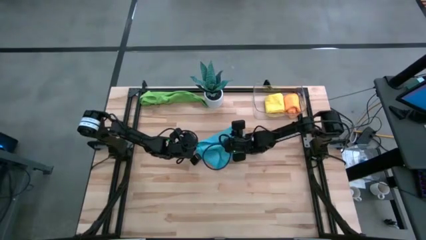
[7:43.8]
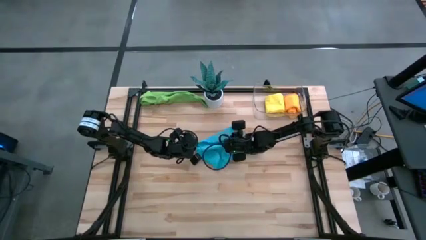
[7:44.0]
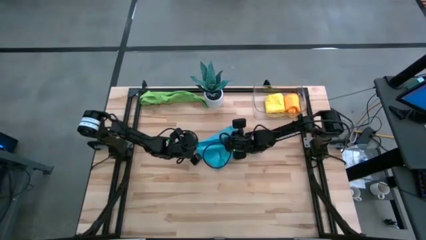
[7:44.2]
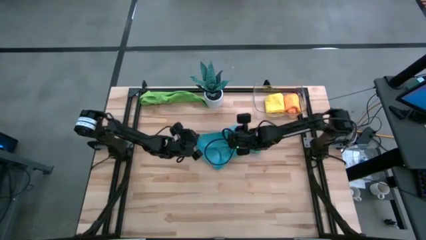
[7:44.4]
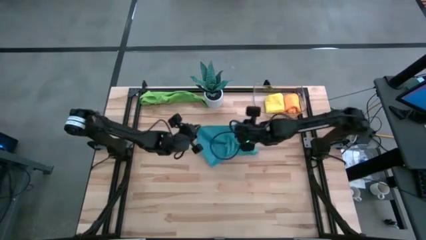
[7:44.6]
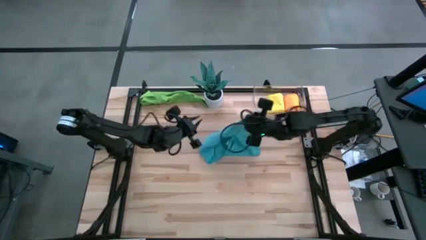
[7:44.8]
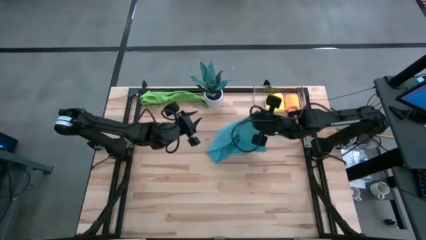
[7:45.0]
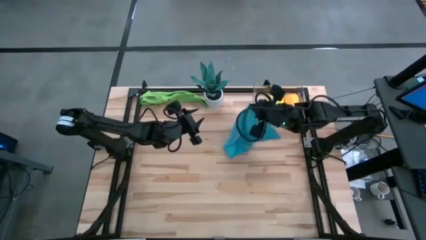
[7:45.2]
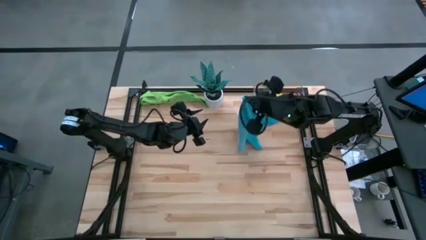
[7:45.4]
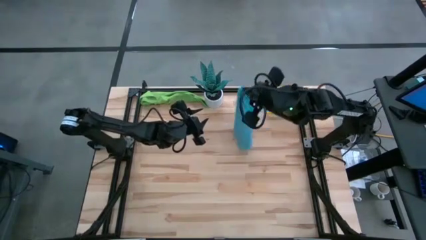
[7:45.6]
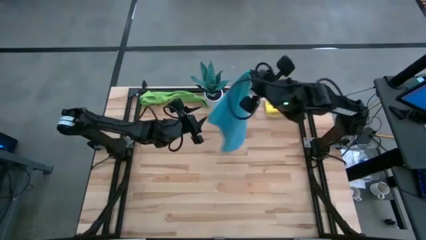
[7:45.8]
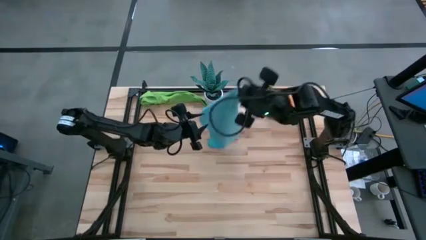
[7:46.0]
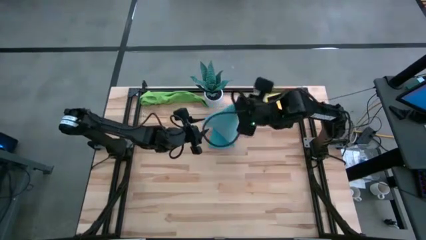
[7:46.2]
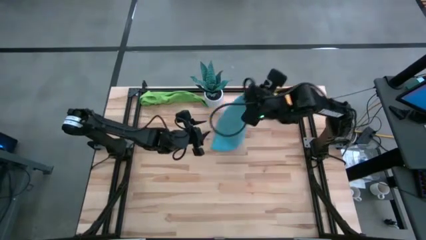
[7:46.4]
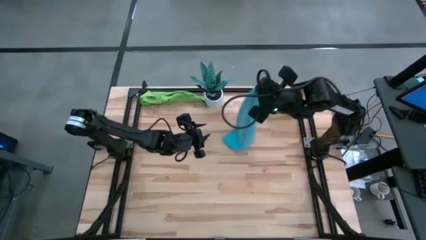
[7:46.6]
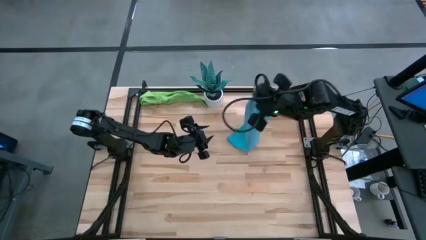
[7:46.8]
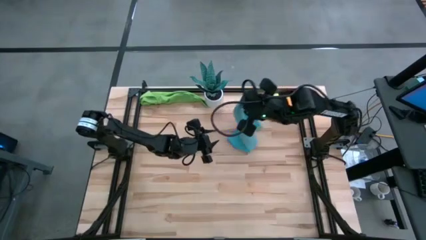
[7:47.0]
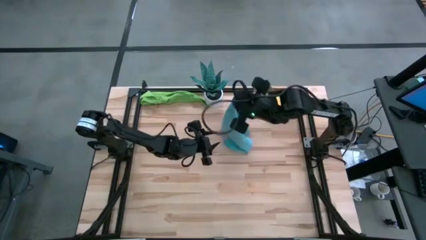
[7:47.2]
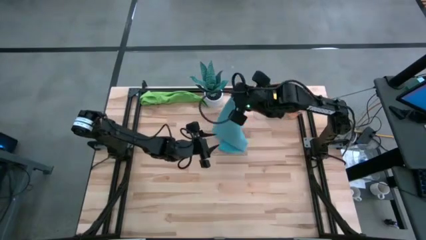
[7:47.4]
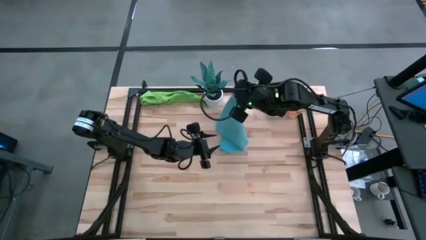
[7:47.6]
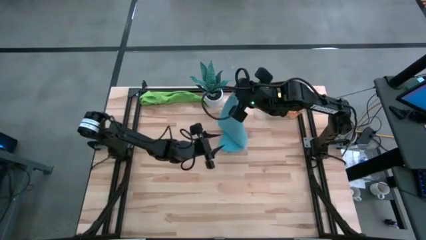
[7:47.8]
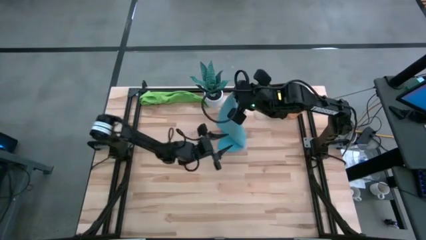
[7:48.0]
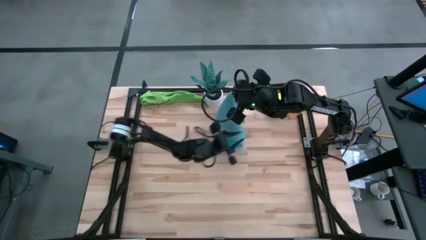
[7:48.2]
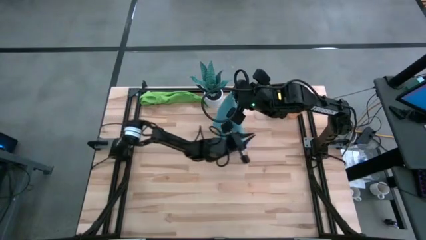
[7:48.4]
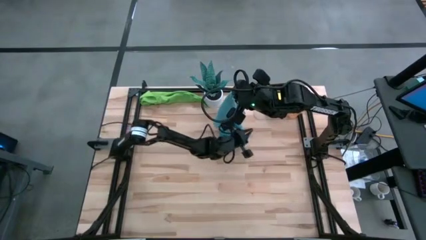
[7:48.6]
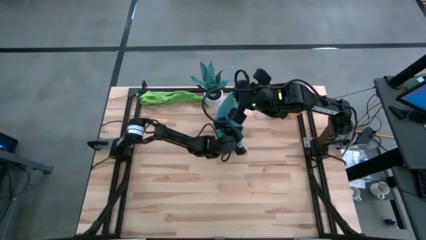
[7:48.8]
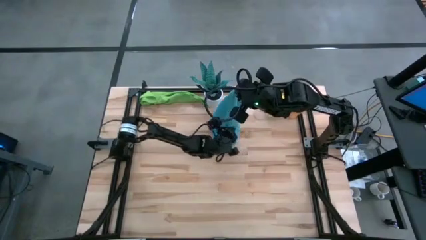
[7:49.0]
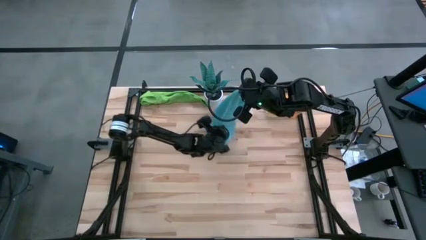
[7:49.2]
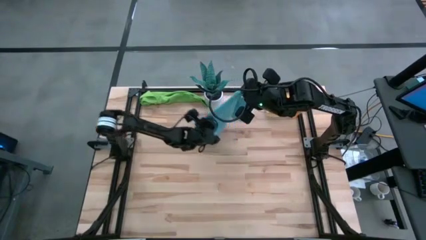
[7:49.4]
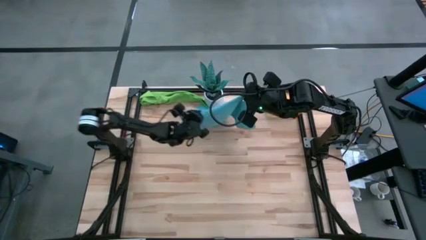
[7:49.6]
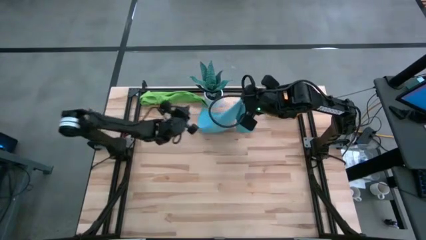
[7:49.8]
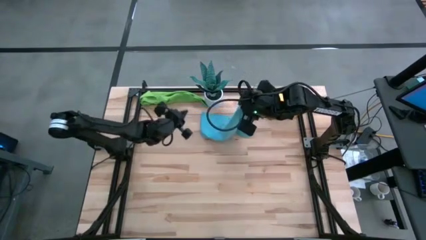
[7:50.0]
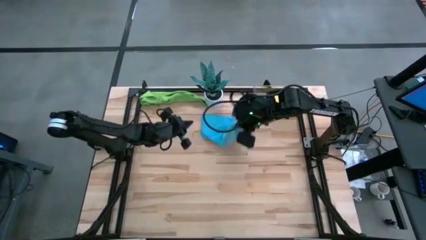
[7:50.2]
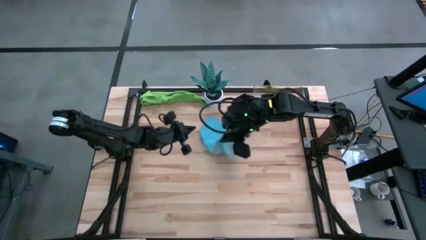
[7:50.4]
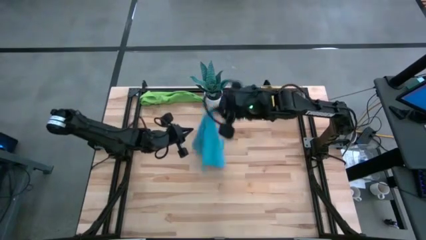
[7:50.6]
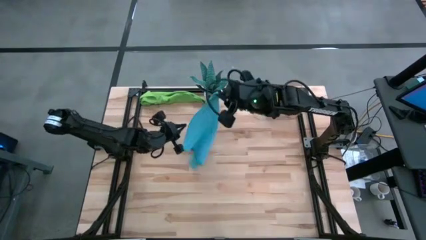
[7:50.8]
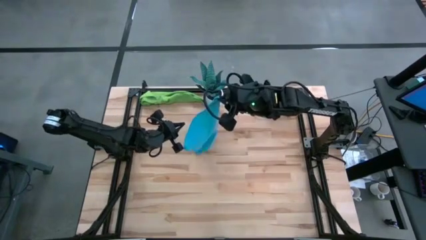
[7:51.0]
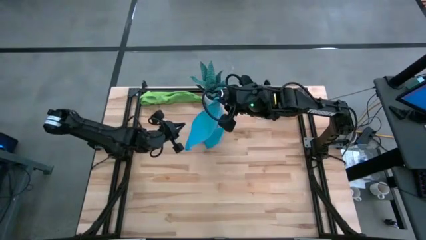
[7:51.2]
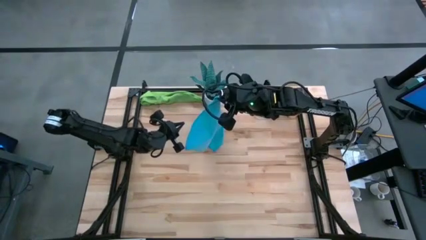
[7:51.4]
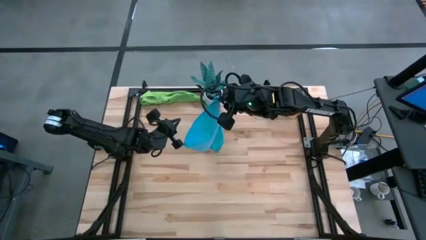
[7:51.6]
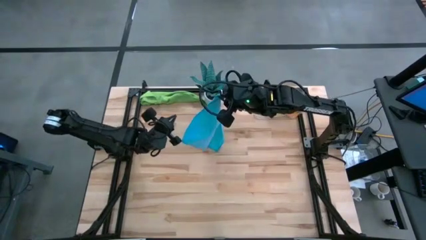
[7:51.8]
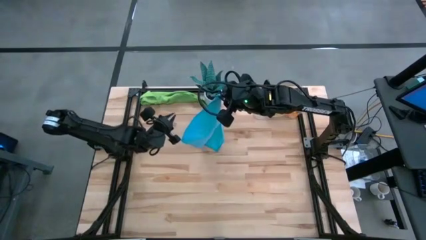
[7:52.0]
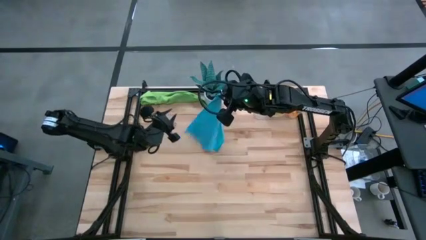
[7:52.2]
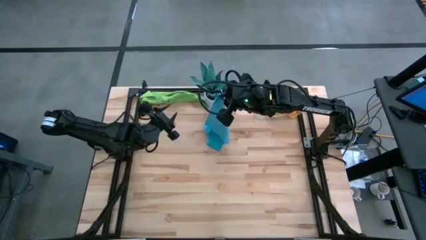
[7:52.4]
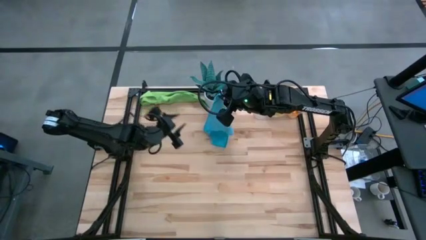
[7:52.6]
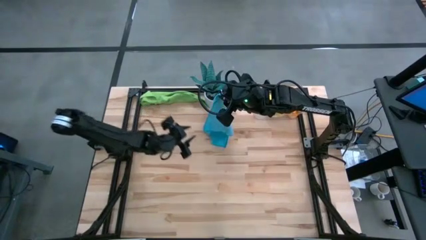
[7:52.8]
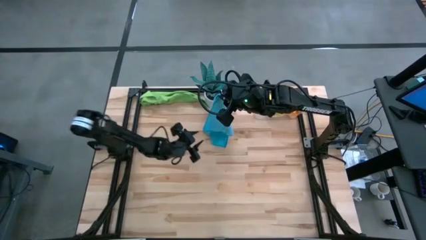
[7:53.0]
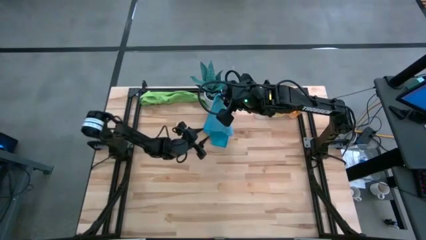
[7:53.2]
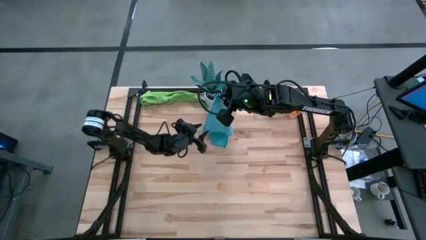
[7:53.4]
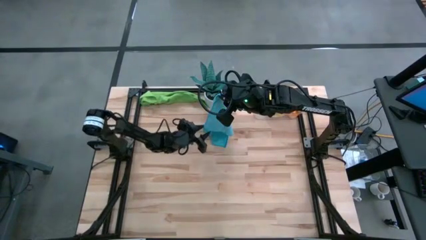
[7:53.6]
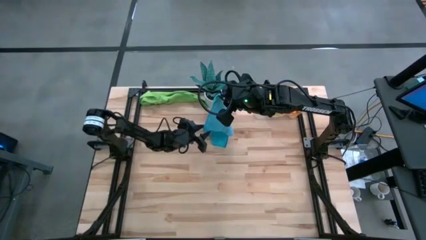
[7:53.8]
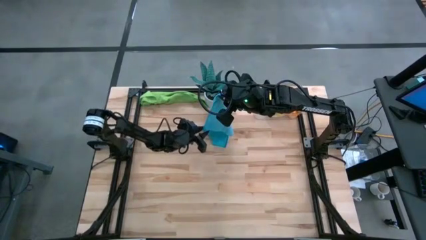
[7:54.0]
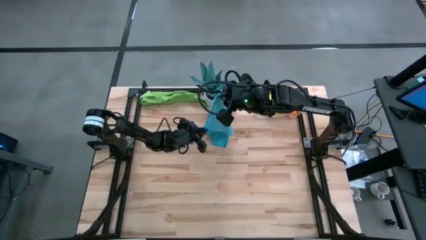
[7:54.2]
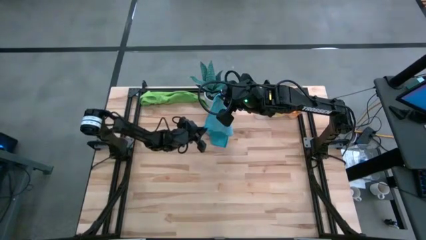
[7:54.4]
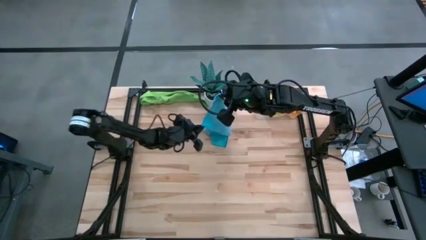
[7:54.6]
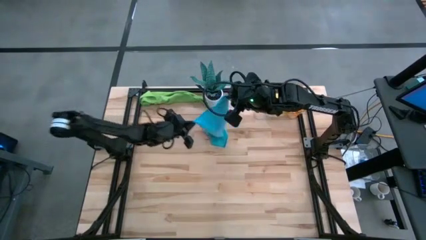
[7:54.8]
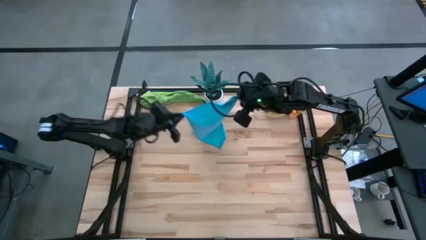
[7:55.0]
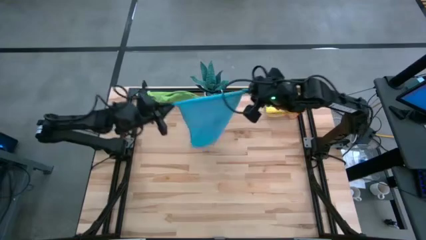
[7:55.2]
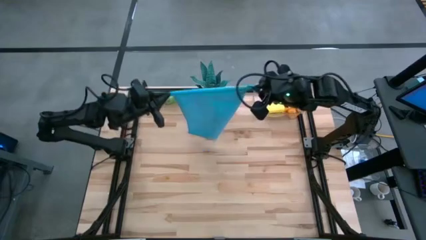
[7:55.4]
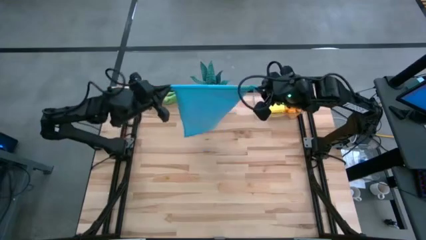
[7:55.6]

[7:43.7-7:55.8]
Task: Roll microfiber towels into tight, uniform cylinder then place into a basket
Fold the blue microfiber cloth

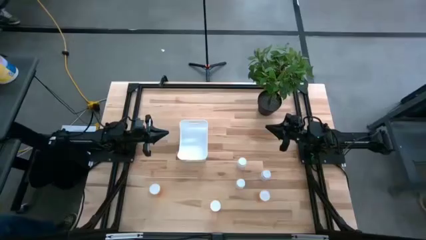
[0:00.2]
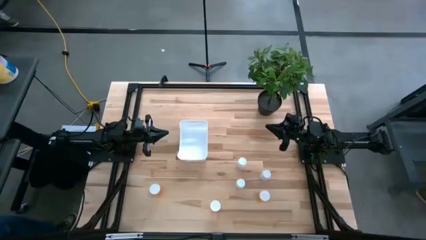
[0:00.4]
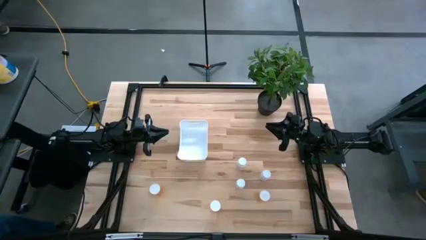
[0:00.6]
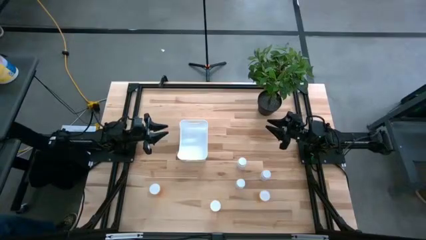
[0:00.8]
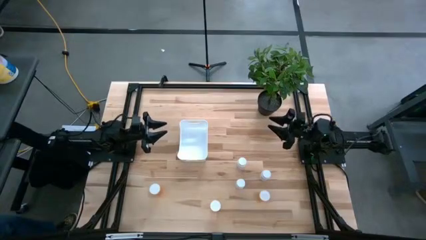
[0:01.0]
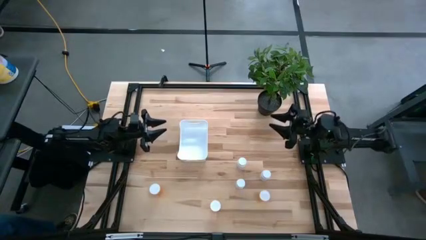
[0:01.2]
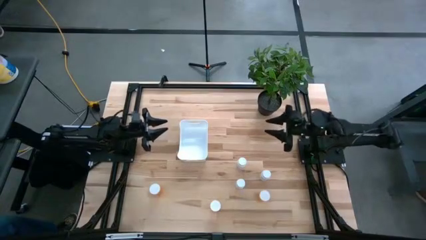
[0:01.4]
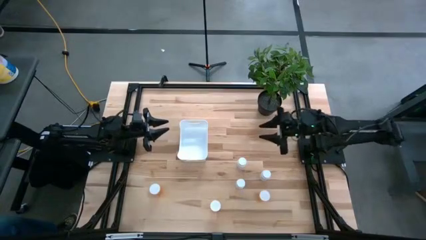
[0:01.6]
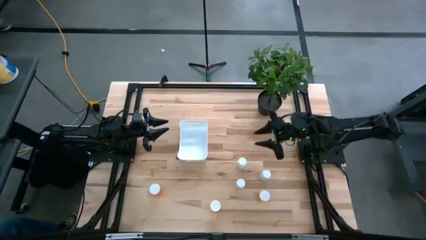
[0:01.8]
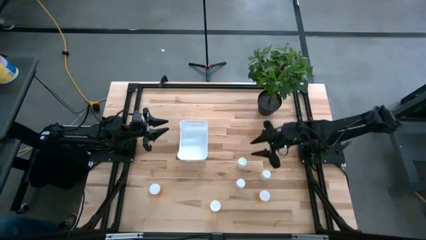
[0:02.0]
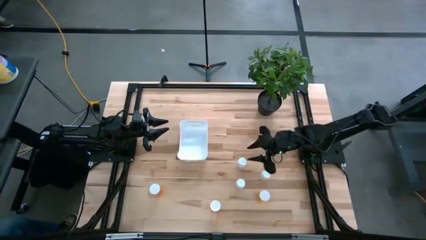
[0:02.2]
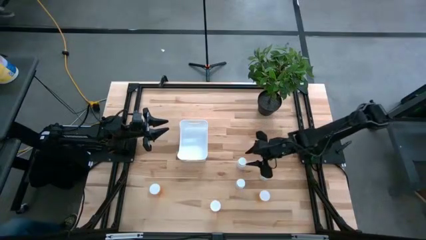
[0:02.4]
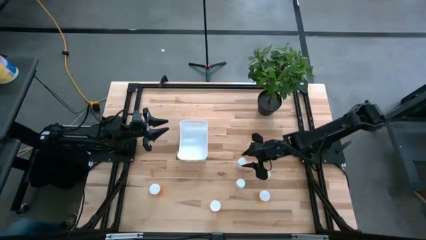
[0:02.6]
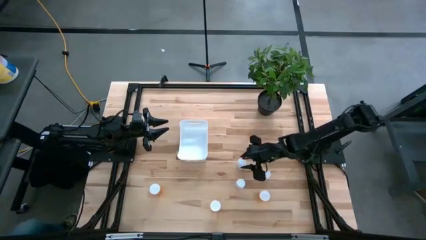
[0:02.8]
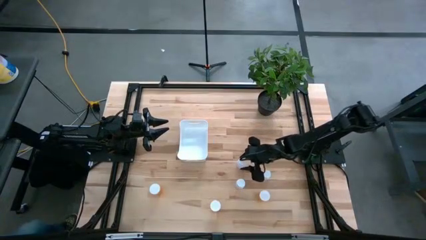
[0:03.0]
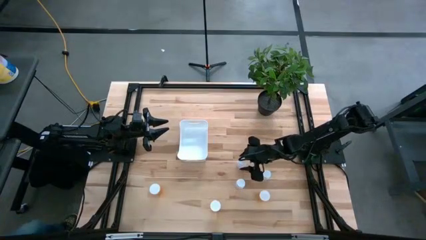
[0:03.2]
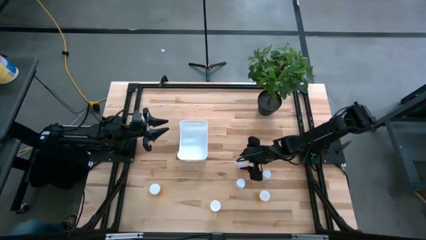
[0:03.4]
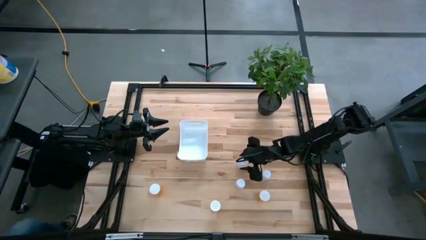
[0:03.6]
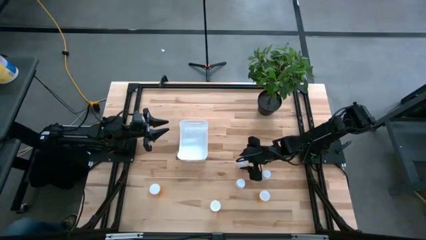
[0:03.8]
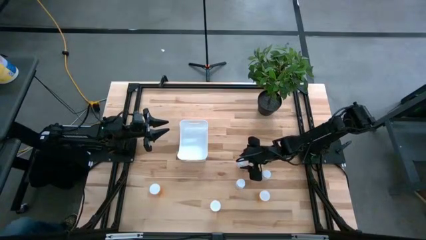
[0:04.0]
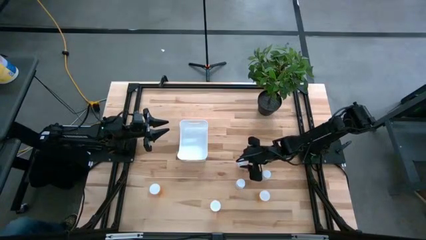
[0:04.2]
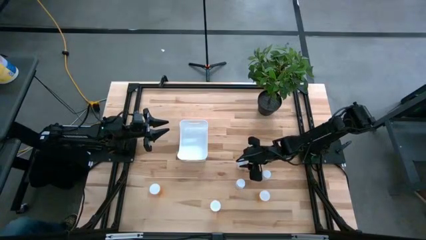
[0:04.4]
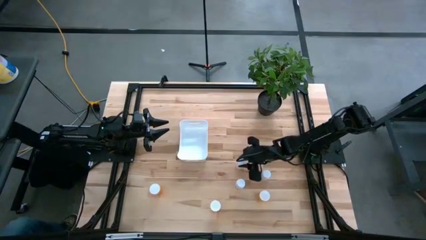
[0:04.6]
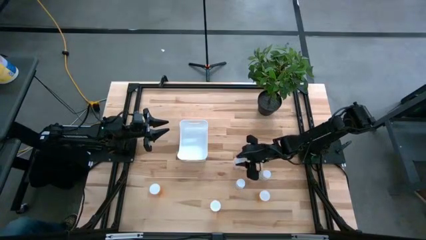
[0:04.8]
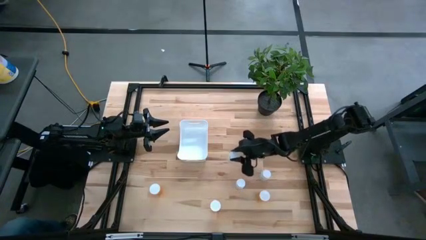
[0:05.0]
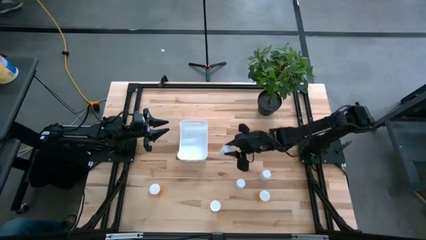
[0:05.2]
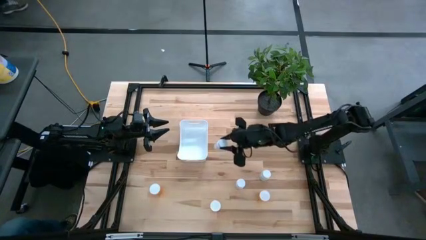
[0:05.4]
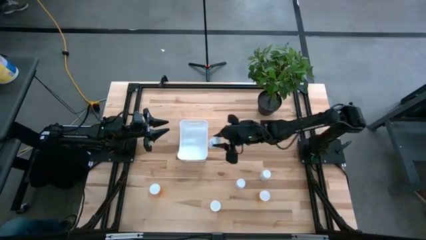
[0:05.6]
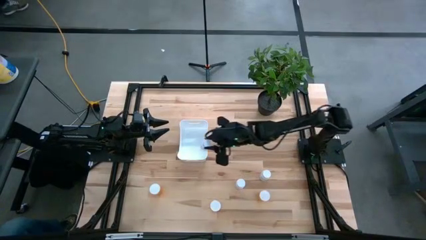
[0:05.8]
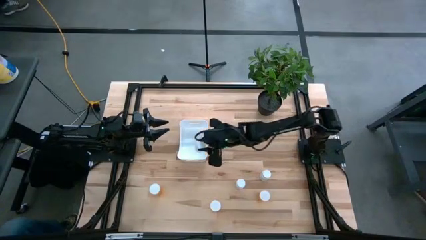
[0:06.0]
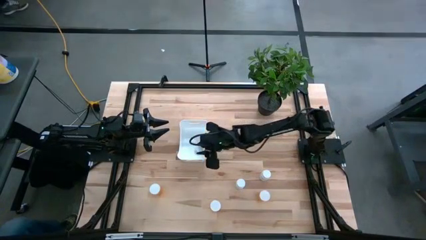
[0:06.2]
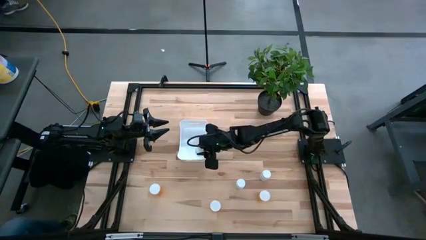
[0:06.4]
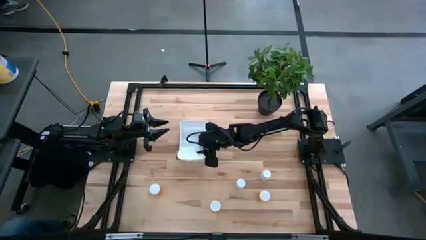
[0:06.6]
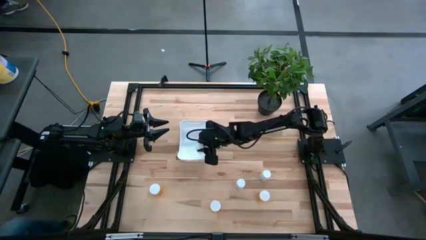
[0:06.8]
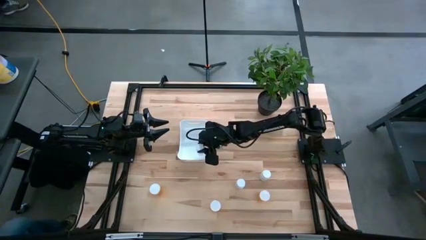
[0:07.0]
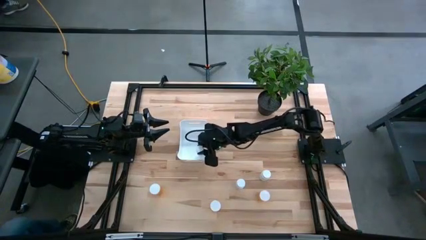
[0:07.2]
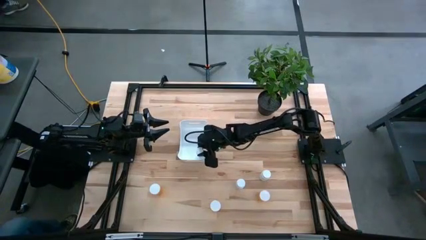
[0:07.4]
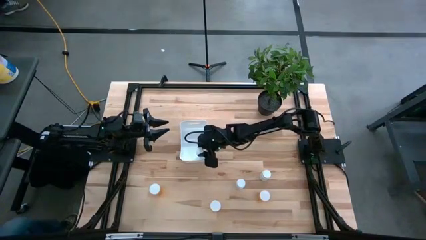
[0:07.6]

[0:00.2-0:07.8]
Task: Pick and place pill bottles into a basket
Put the top white pill bottle into the white bin
